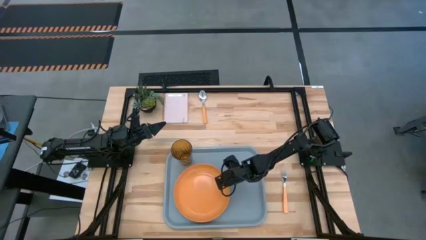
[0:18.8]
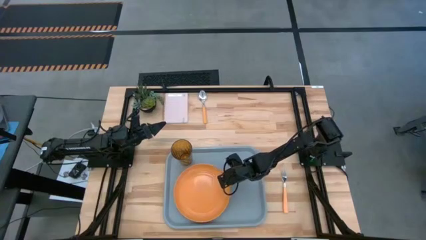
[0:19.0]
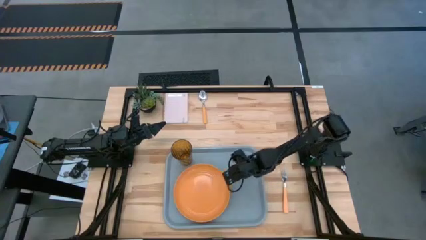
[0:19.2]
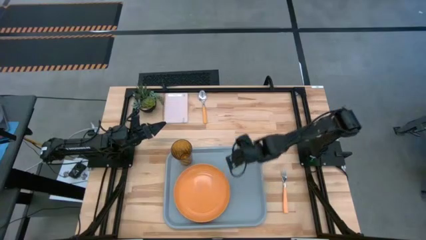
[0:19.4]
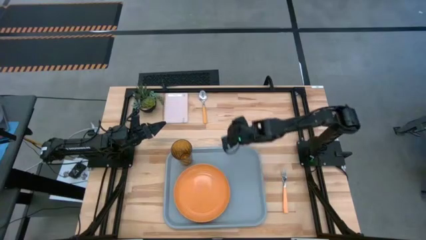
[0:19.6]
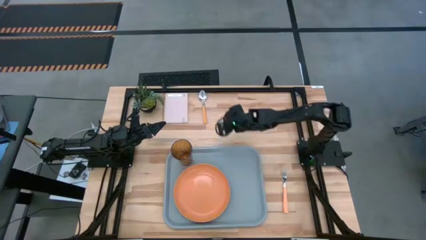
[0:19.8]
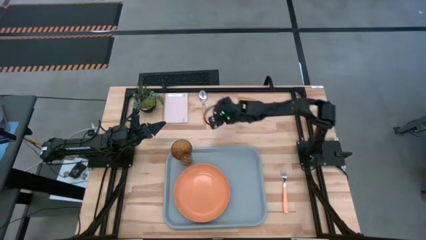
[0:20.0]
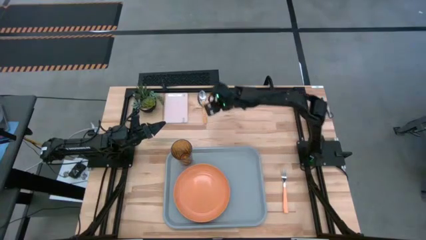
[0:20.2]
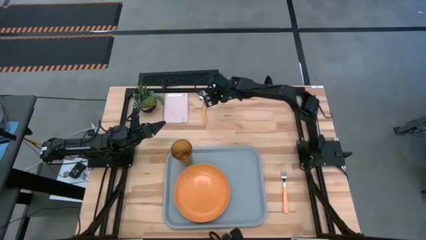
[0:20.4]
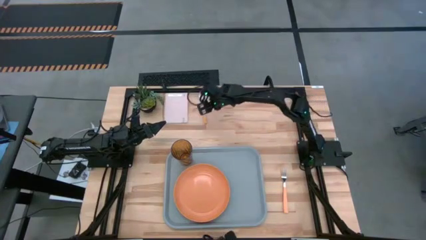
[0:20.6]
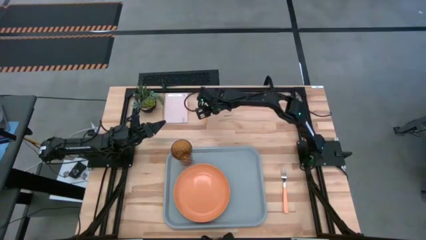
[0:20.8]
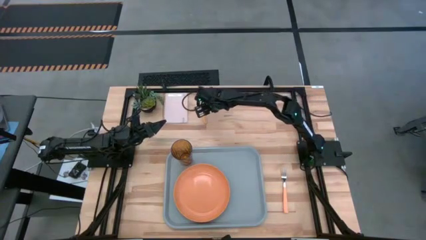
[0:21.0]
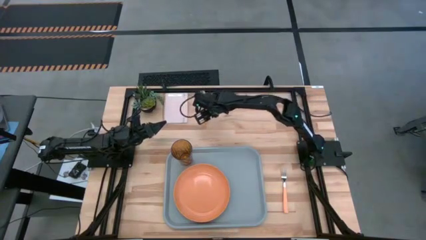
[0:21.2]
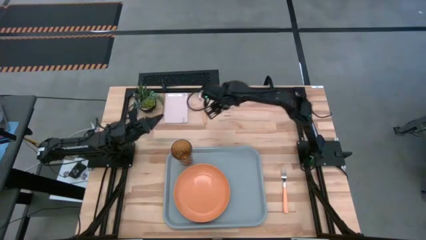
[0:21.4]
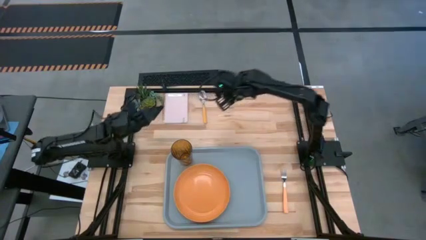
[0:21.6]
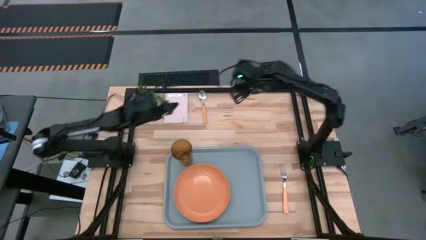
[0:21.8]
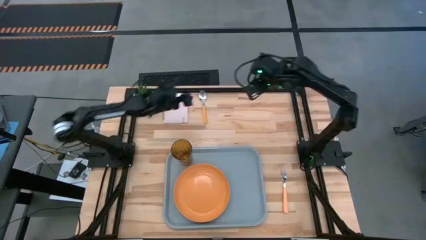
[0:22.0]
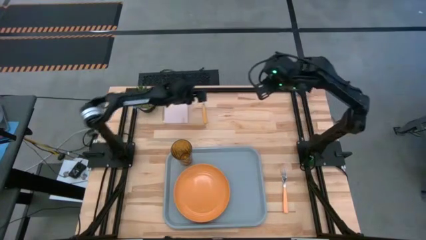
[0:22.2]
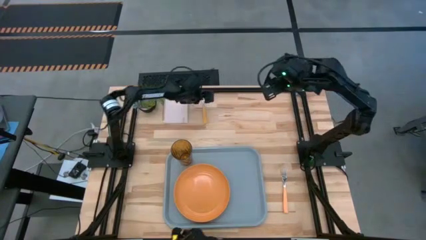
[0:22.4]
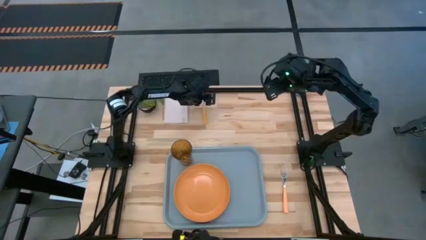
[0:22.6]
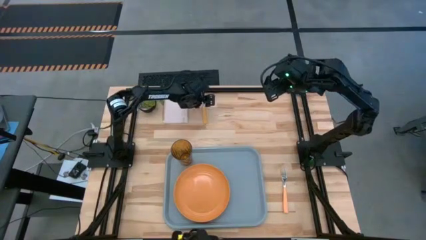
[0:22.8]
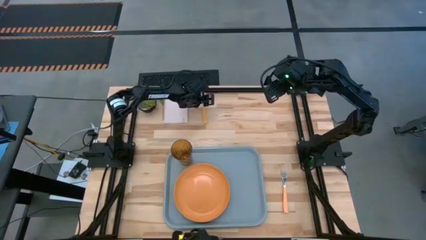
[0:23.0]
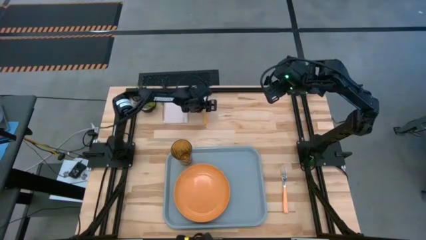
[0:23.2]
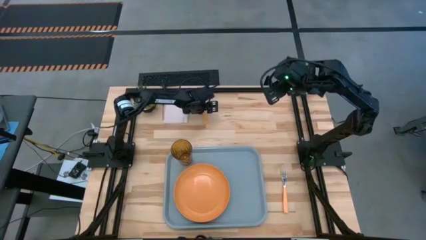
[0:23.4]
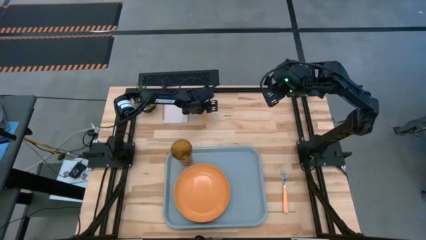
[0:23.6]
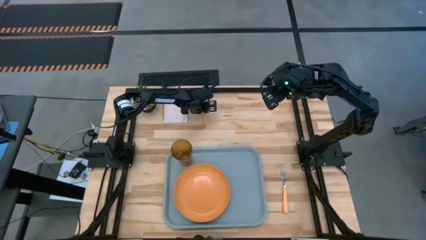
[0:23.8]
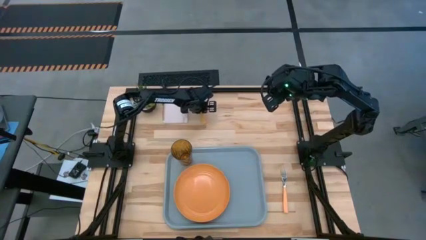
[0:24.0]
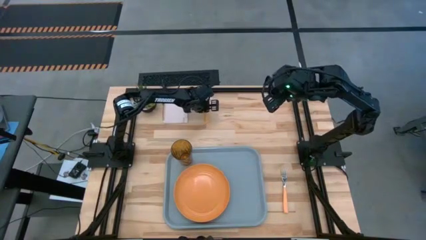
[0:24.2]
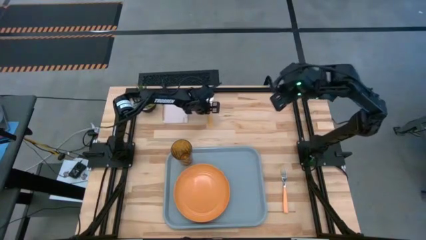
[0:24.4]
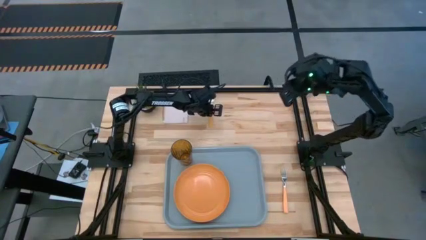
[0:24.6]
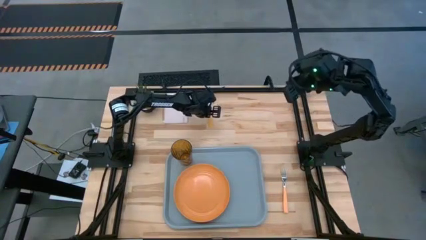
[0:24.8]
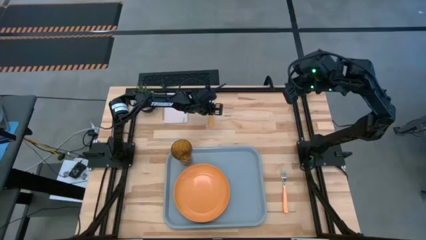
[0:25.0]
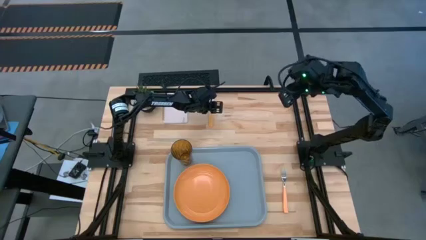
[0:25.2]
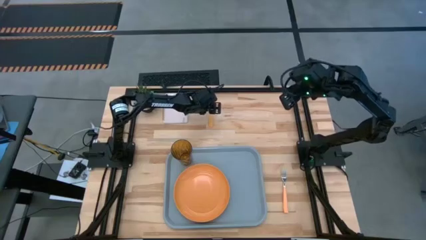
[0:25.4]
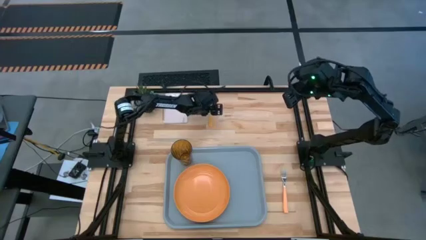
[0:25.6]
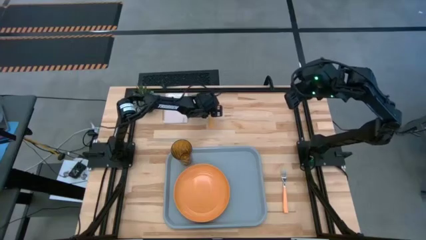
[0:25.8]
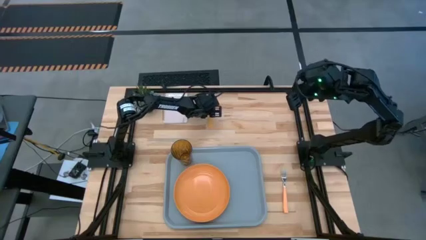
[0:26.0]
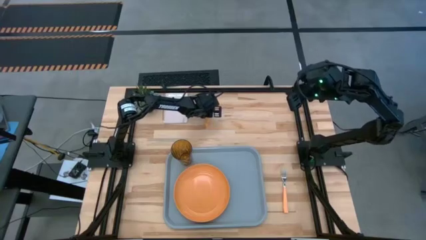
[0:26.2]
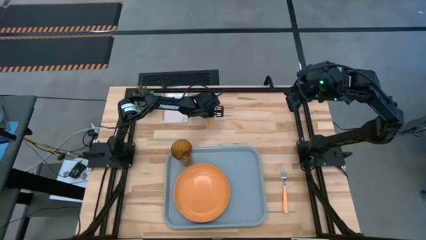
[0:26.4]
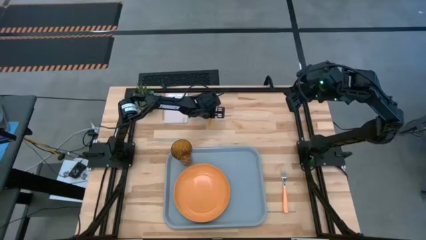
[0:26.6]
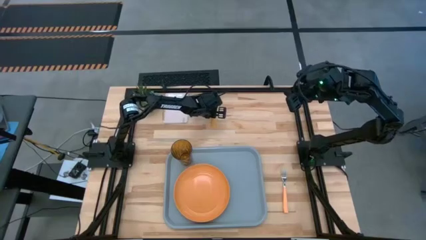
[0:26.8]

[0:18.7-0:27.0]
Task: Pick and place plate/cup/fork/spoon on tray
Put the orange spoon on the gray tray to the right of the orange plate

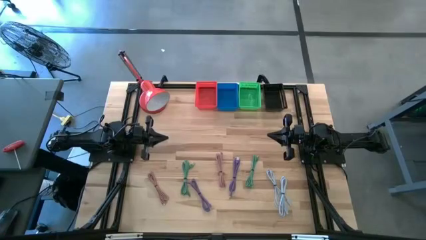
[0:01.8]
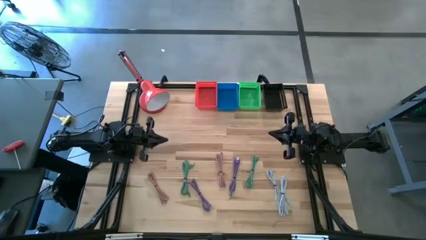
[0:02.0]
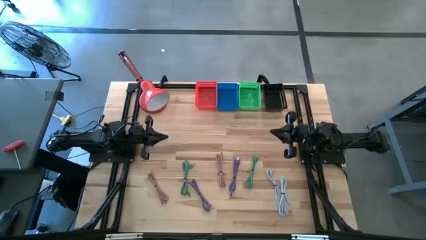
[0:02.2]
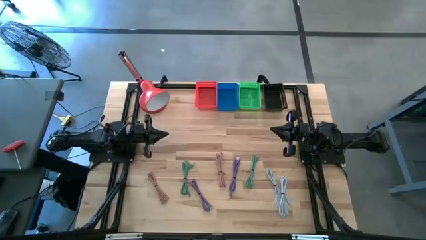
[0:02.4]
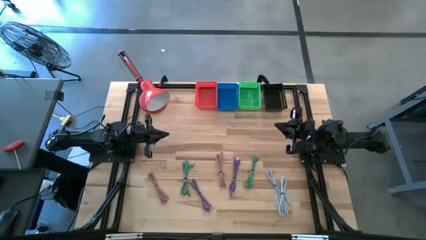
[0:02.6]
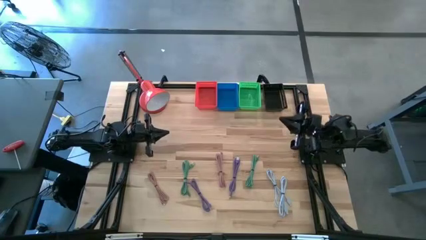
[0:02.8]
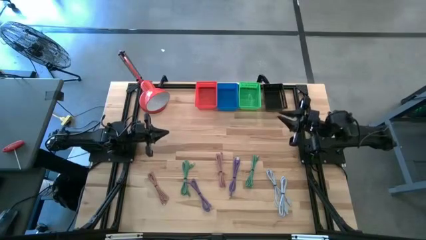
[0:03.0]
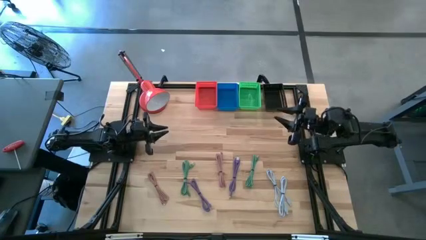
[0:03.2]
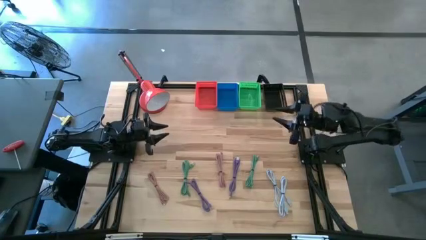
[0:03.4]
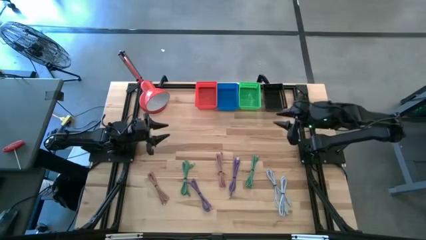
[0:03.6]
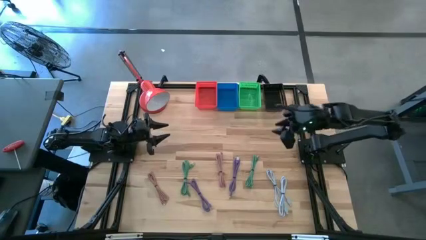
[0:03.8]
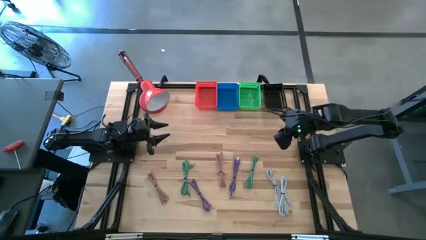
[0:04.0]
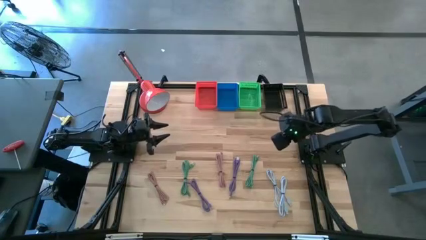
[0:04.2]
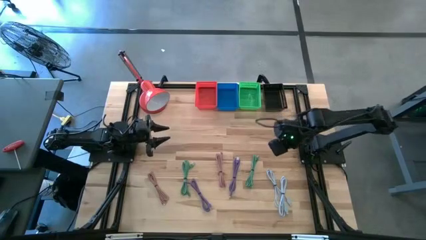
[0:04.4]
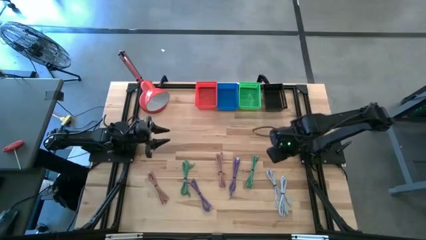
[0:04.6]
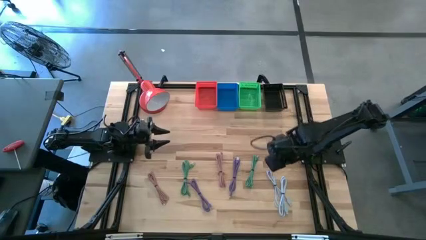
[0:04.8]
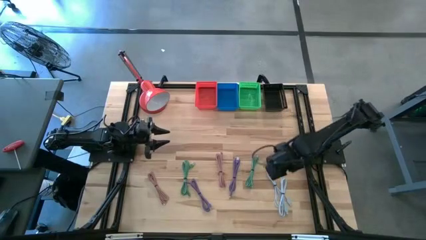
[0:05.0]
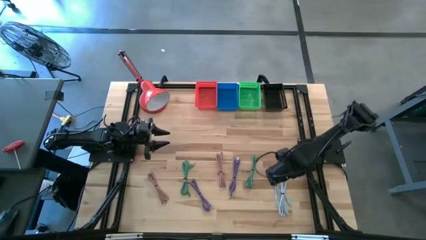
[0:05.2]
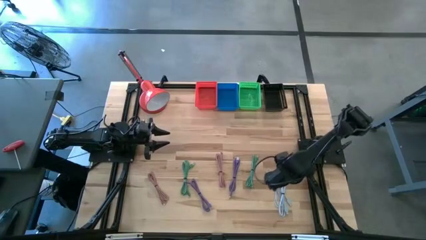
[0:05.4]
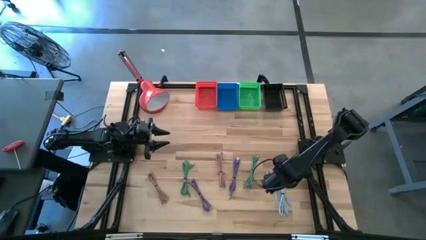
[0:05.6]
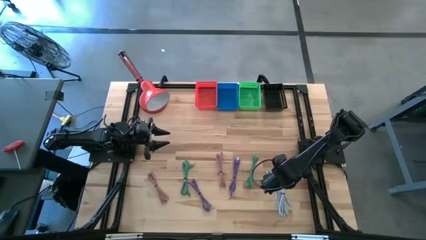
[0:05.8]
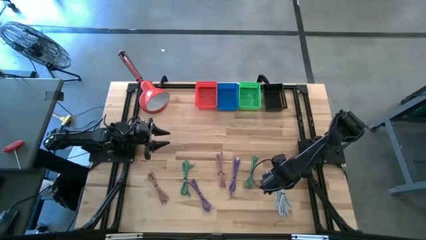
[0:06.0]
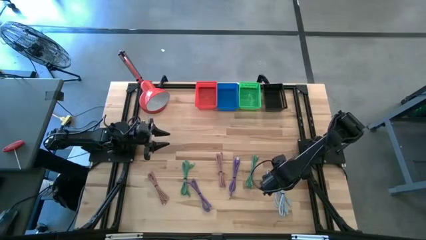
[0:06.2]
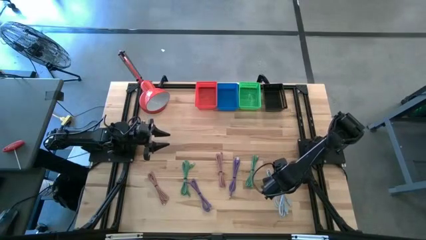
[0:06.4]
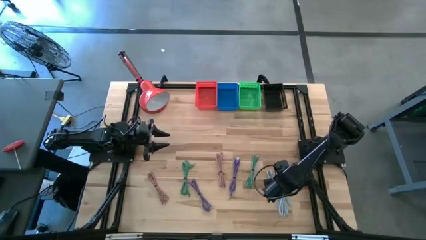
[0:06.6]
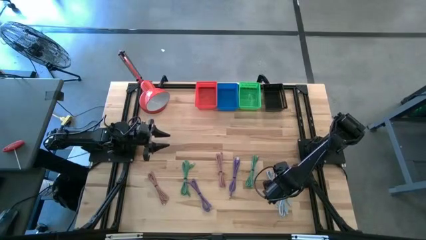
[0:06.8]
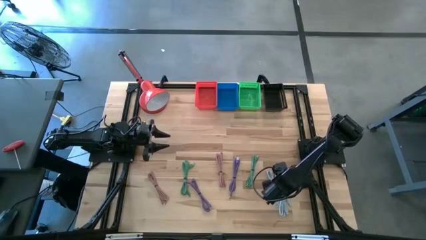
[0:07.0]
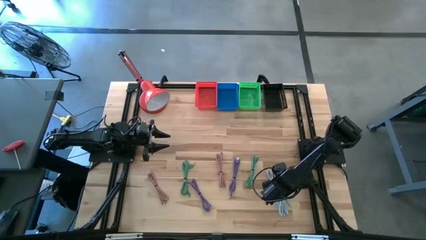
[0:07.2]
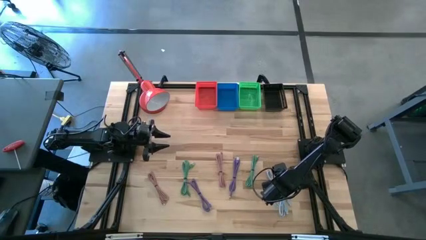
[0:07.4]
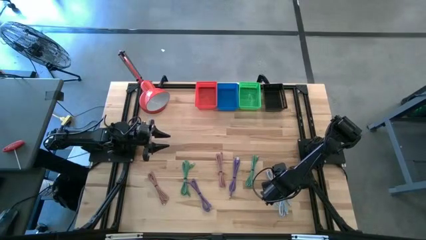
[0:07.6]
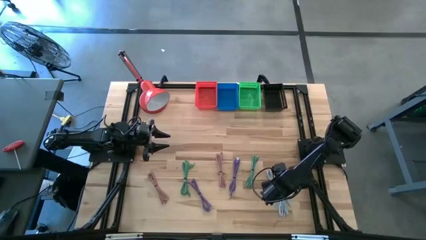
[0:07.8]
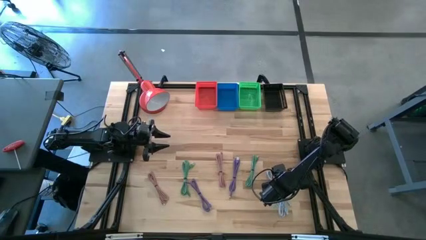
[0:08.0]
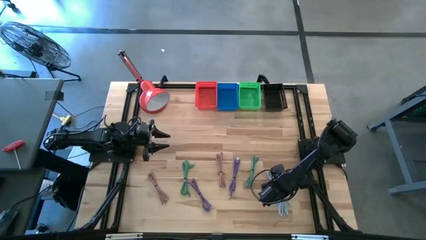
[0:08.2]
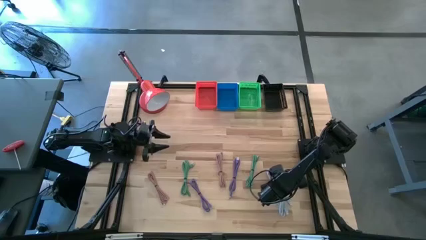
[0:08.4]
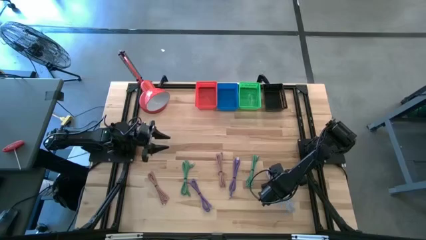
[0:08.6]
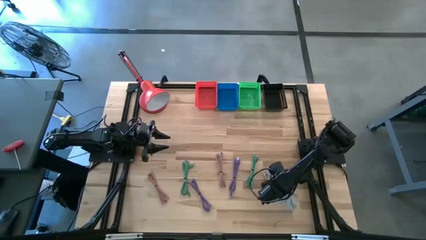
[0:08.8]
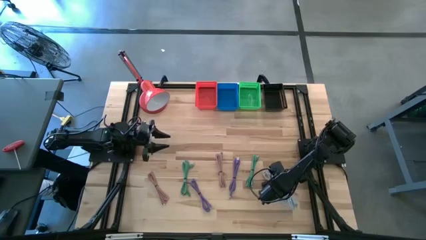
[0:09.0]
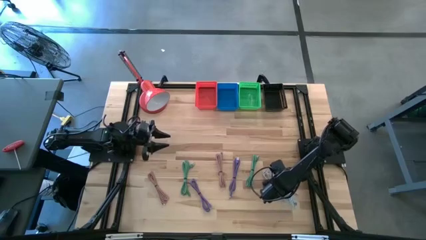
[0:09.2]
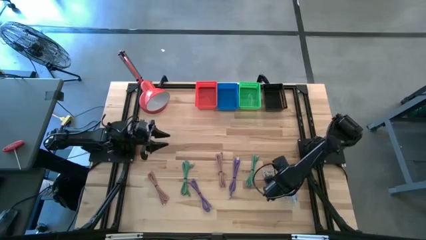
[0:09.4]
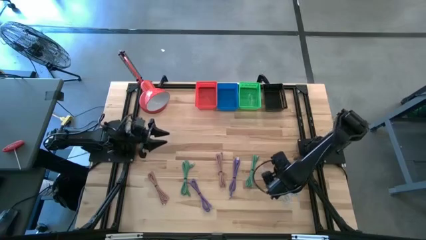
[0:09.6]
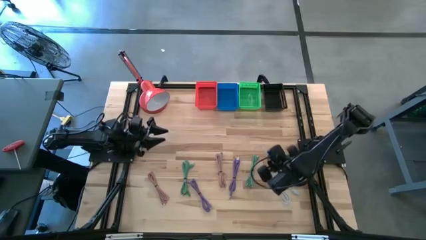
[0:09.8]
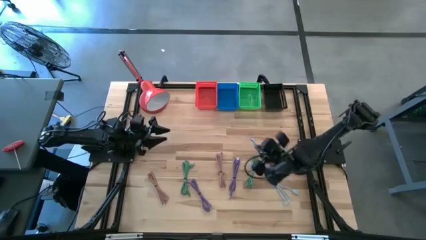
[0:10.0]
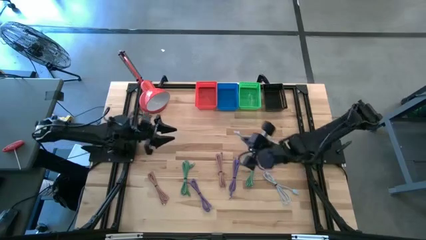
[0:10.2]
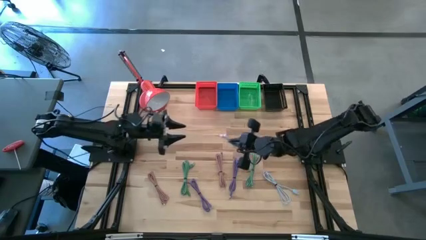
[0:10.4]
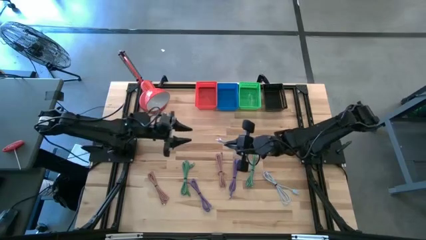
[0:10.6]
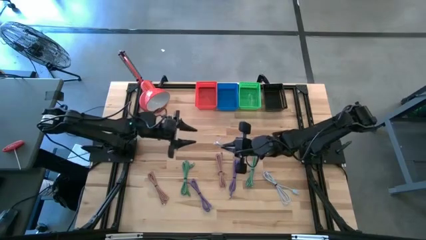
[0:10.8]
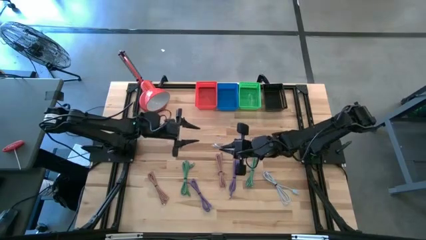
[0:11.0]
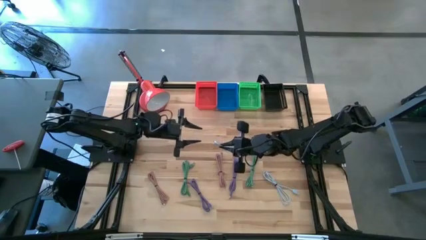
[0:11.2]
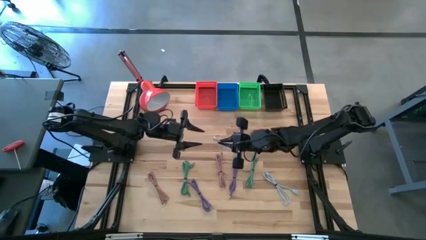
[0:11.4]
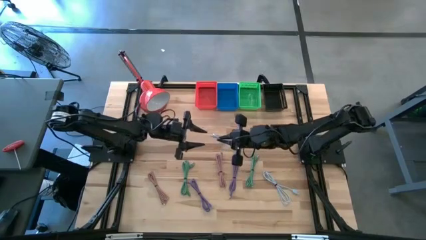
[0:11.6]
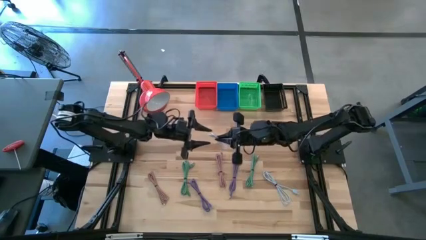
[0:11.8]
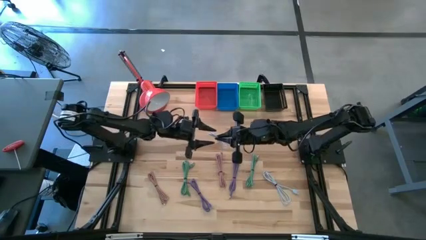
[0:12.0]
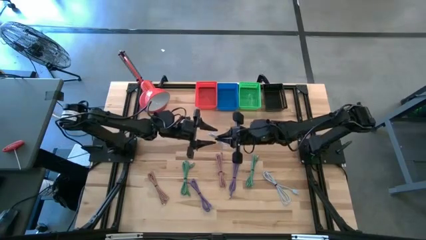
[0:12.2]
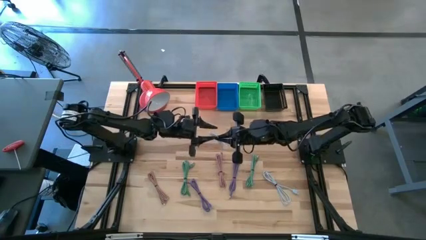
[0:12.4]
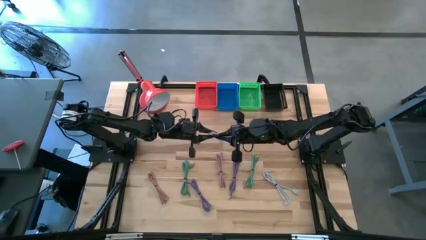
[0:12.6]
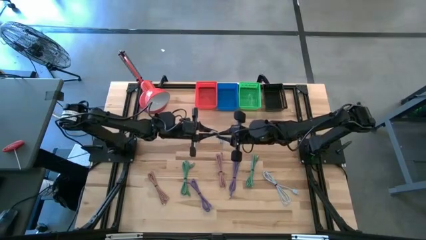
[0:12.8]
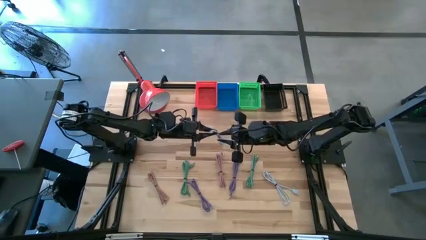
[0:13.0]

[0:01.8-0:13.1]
Task: Pick & Place USB Port
Put the right blue charger cable into the blue bin
